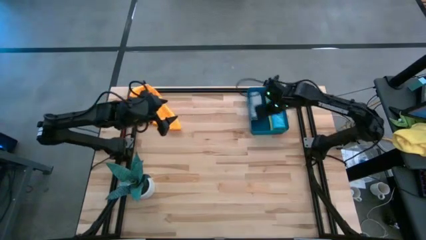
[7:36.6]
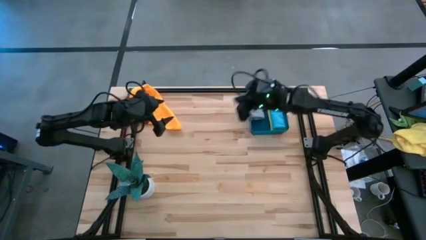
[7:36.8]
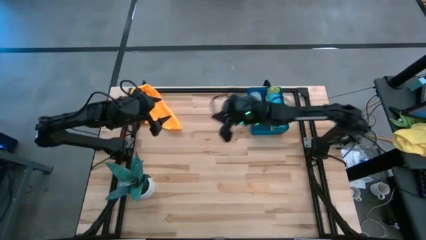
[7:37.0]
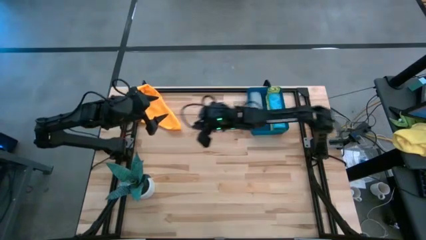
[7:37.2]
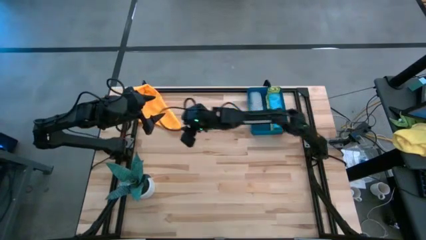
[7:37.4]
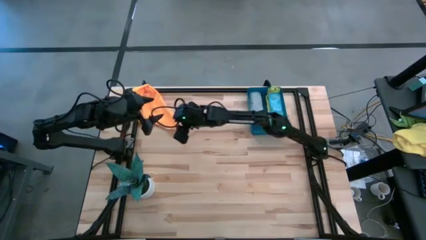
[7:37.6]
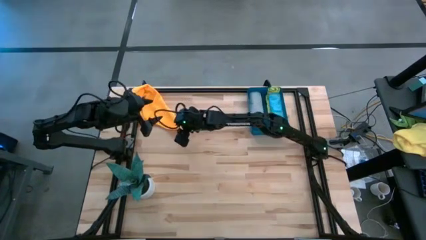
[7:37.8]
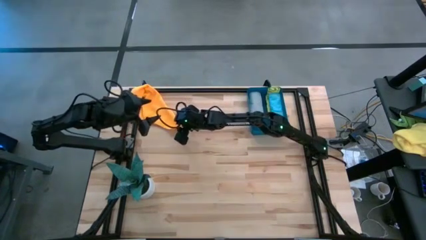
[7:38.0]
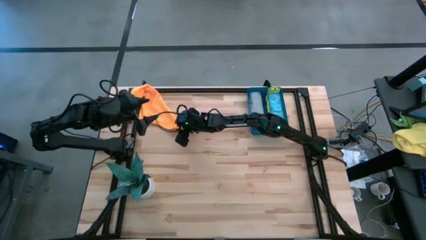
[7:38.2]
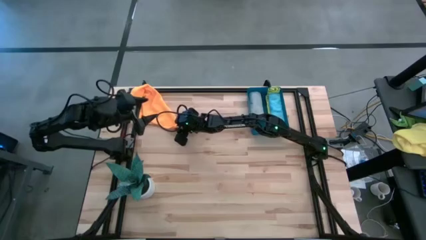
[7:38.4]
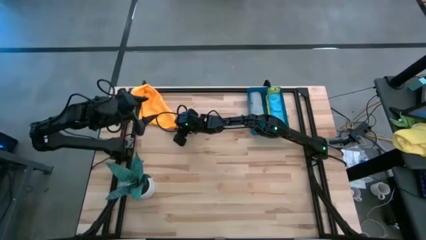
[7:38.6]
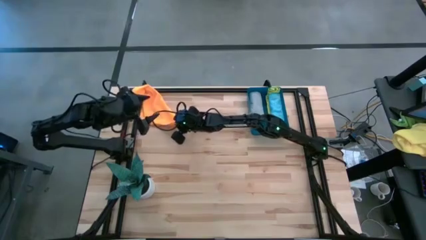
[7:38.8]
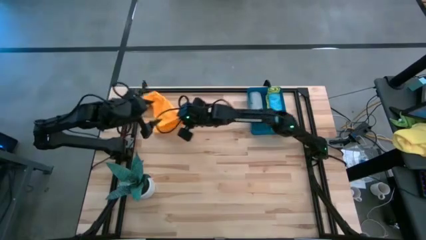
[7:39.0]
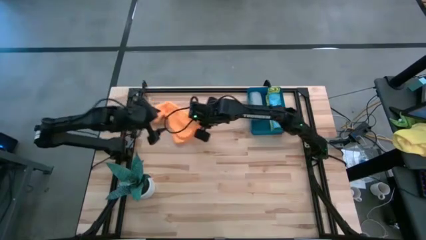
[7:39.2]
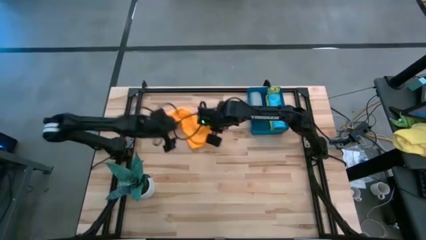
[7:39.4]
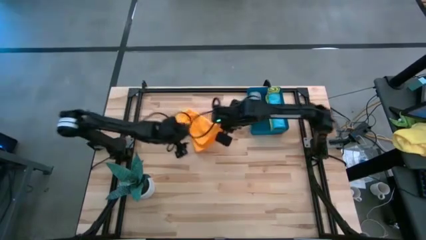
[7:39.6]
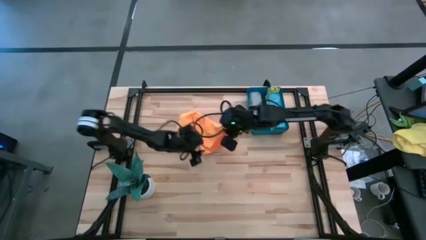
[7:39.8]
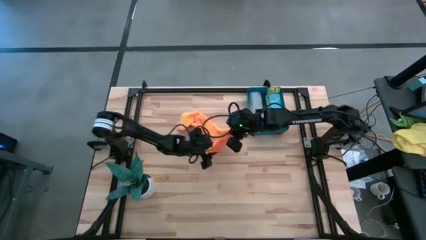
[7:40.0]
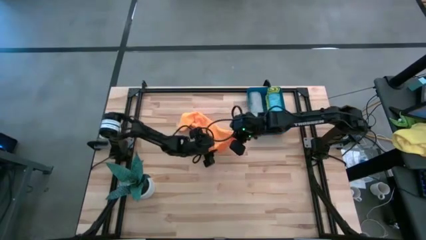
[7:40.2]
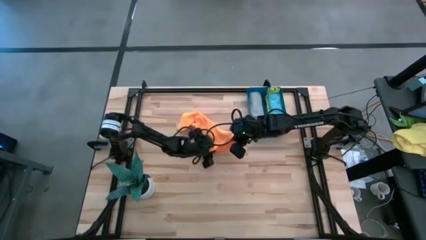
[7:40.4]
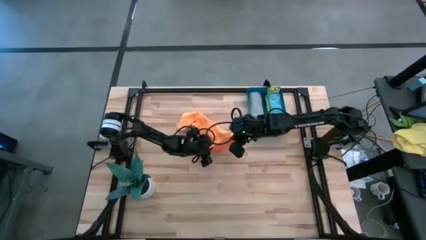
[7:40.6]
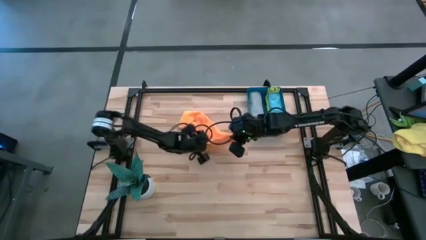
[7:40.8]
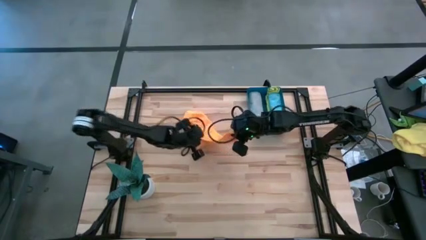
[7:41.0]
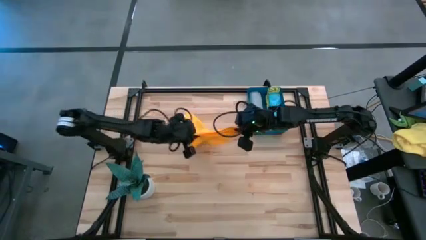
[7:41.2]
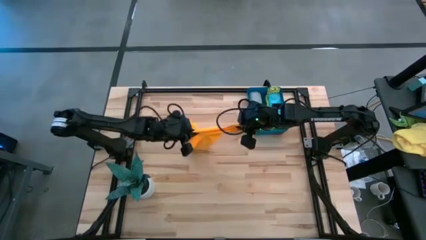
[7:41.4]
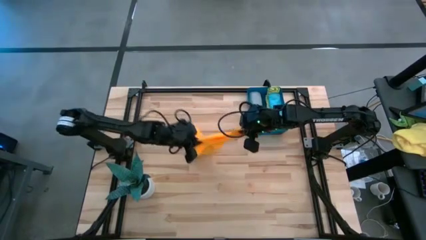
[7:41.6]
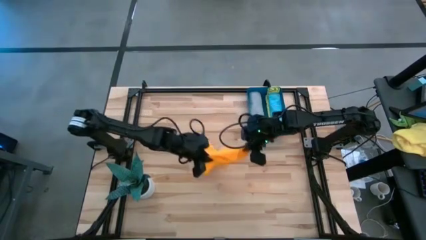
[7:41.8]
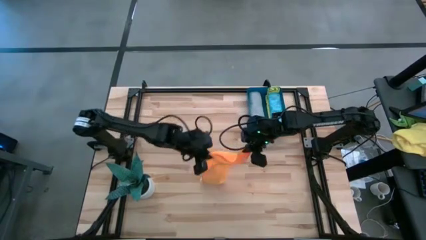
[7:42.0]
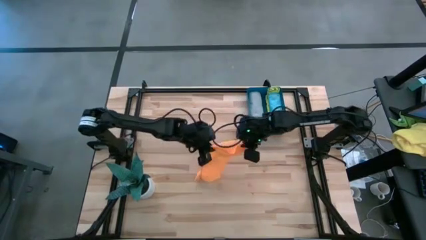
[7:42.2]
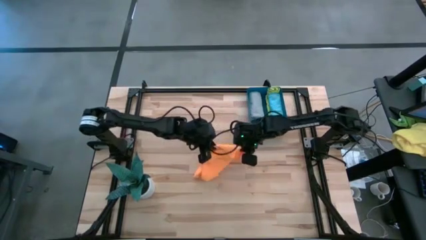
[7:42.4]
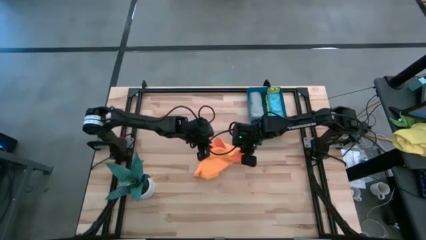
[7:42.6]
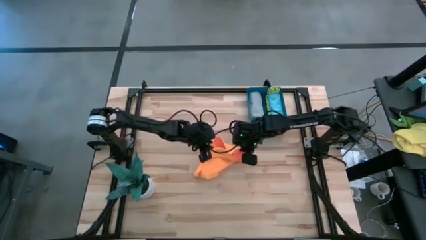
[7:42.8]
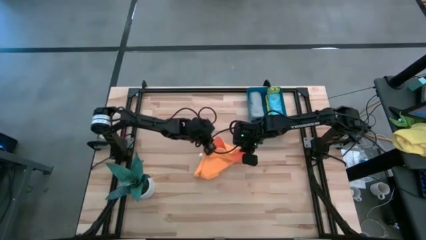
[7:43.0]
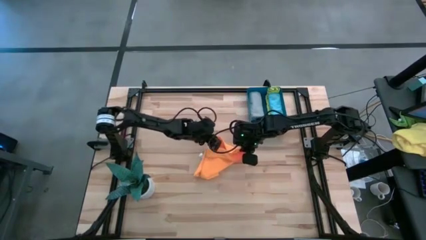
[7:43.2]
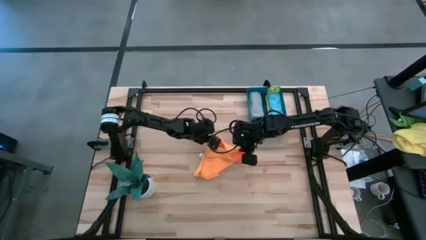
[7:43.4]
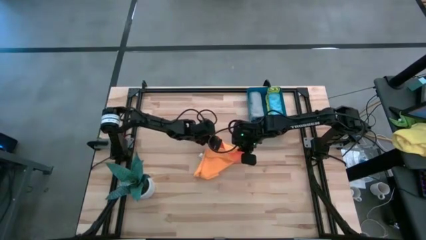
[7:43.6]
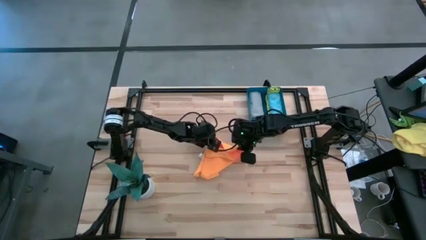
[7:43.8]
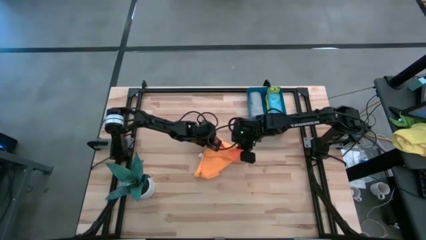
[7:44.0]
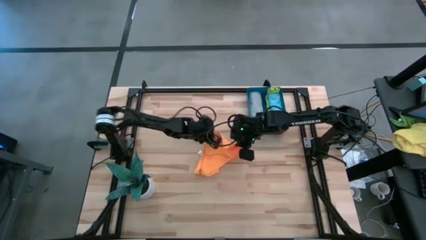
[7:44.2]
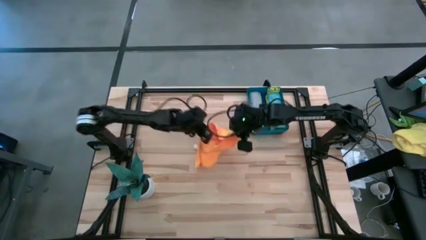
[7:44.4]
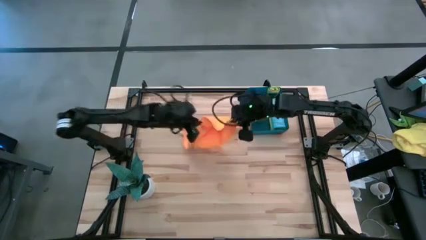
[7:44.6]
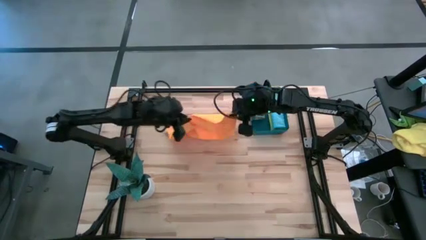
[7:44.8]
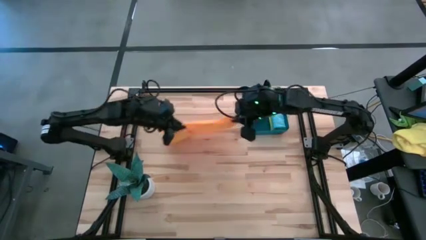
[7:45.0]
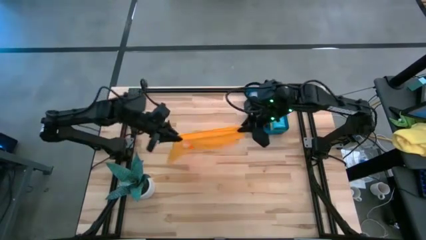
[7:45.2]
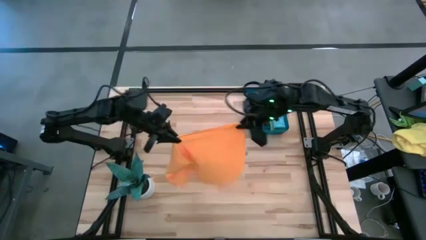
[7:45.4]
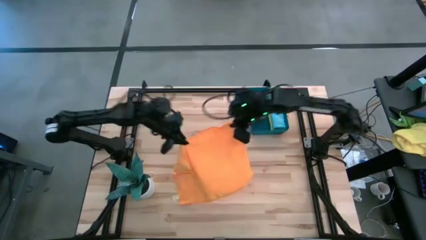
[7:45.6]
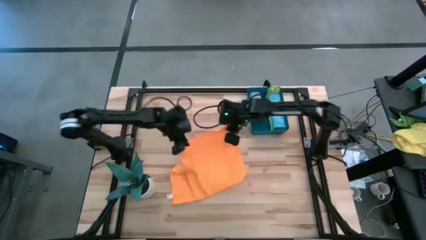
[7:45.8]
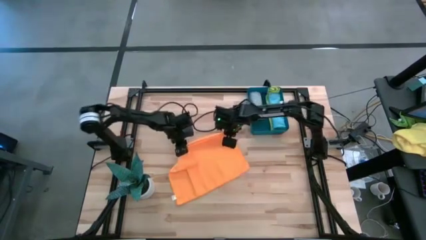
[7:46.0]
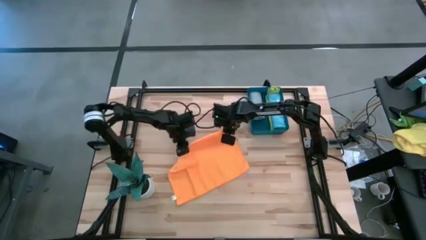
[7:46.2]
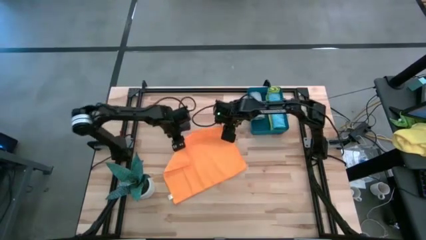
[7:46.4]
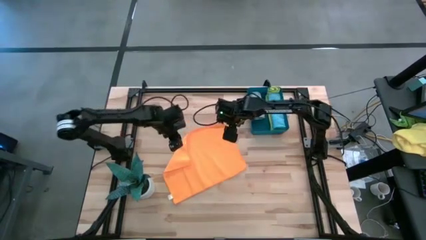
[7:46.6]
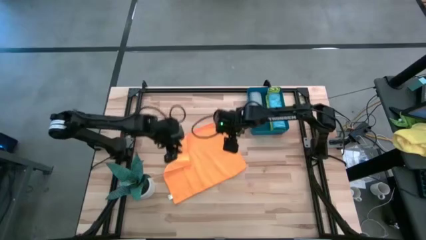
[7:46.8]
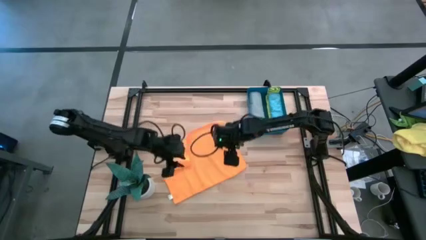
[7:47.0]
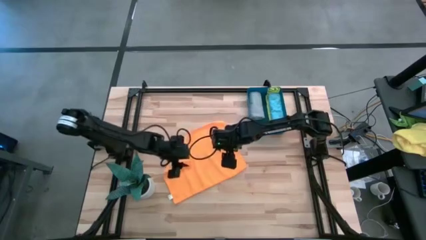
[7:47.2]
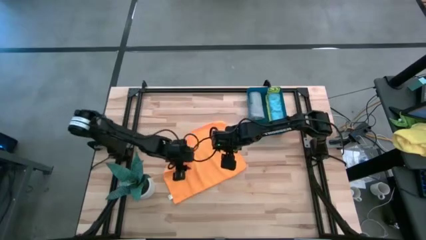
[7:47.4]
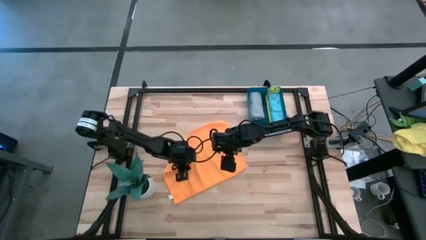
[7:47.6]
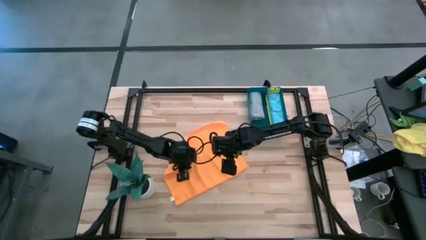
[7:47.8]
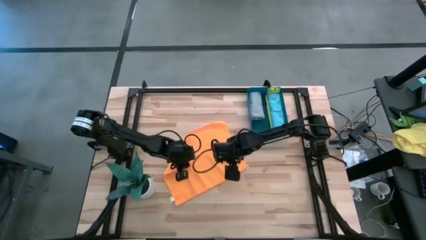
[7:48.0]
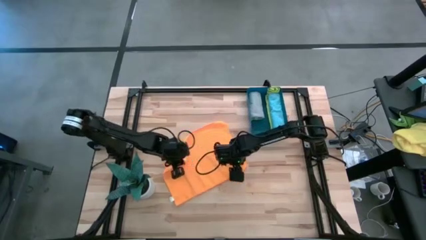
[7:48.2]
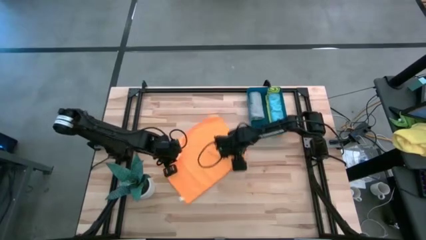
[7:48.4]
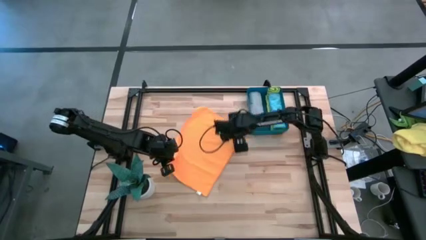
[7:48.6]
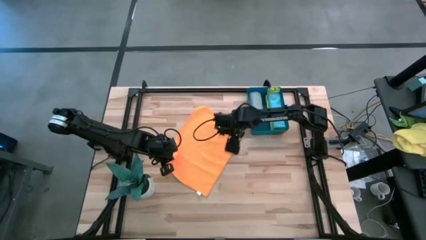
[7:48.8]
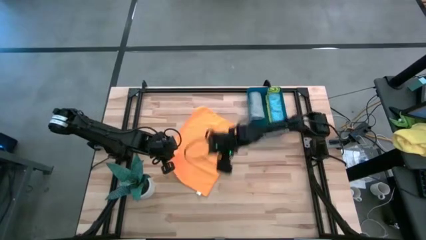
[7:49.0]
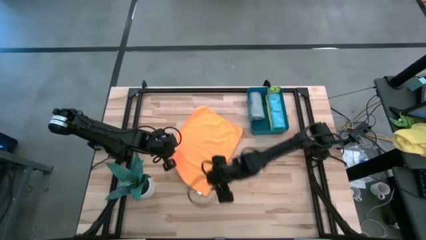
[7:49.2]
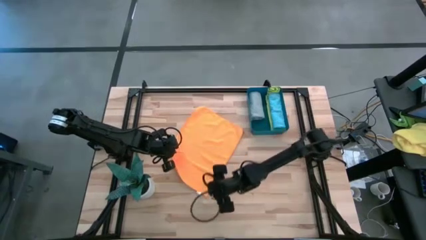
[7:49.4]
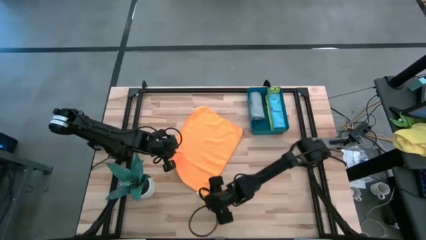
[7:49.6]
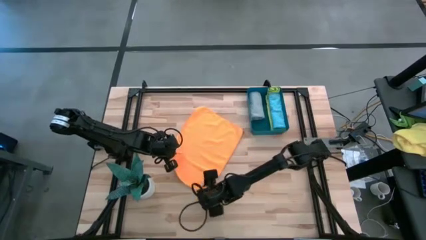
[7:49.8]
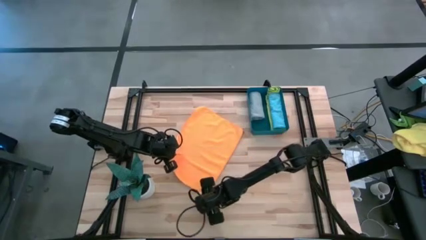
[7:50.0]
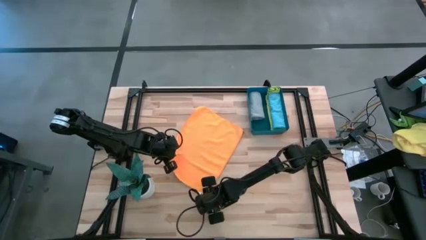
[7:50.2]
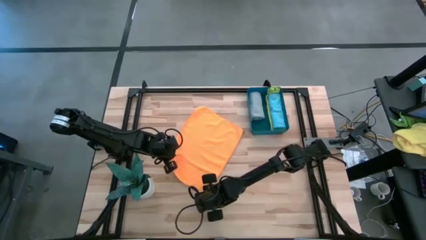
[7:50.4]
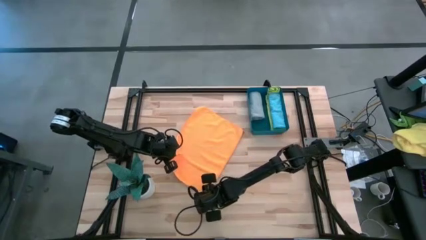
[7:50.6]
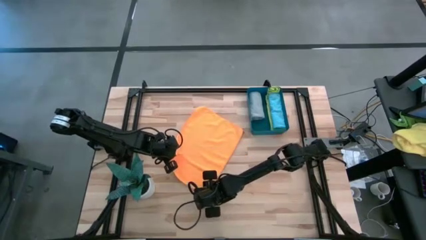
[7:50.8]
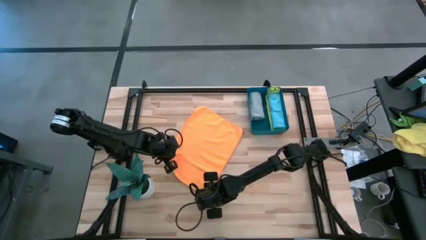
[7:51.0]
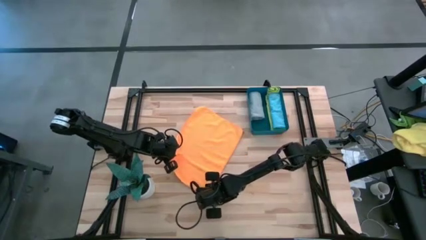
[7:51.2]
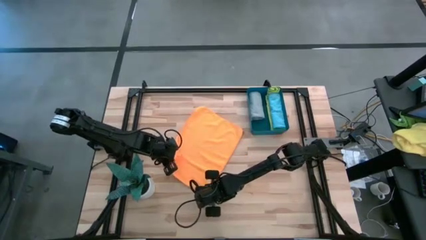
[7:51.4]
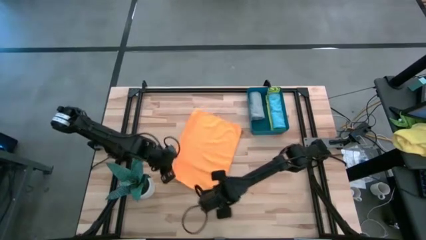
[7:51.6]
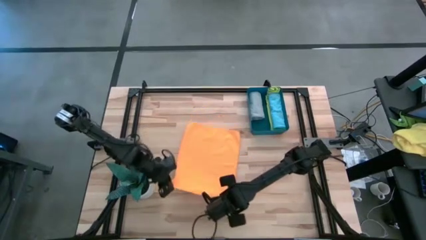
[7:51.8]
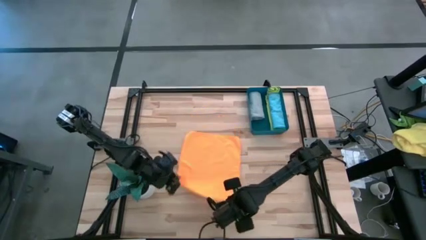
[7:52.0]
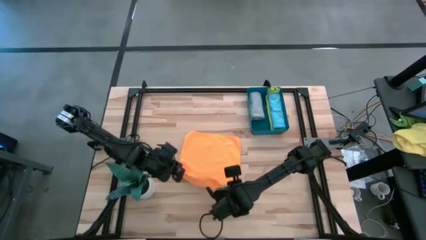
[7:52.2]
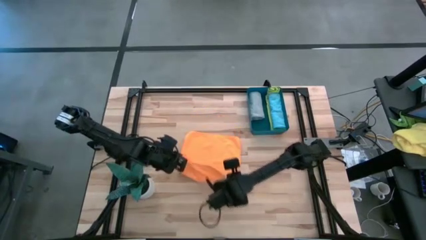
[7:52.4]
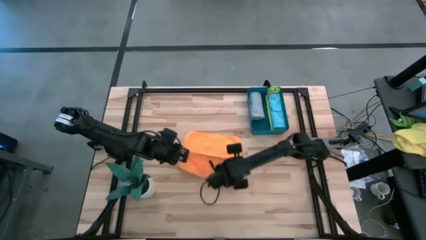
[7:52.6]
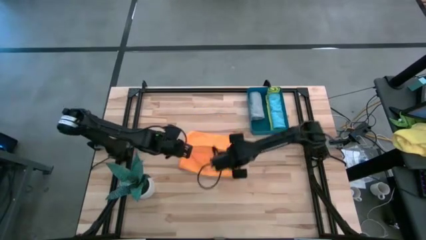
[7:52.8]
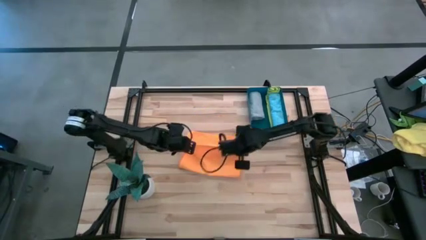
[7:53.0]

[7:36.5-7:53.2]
Task: Roll microfiber towels into tight, uniform cylinder then place into a basket
Roll the orange towel

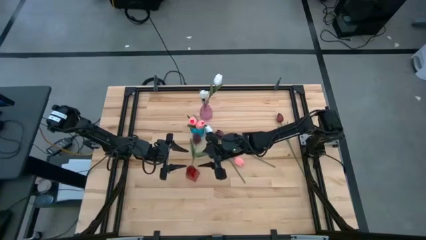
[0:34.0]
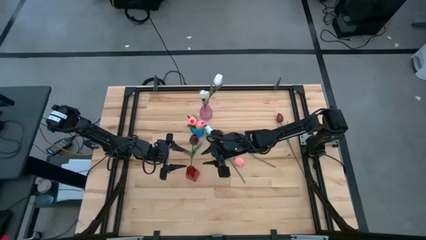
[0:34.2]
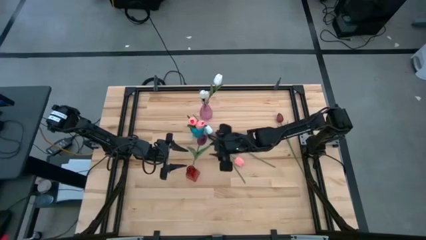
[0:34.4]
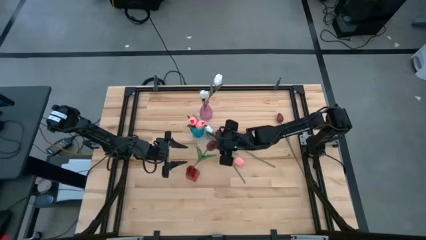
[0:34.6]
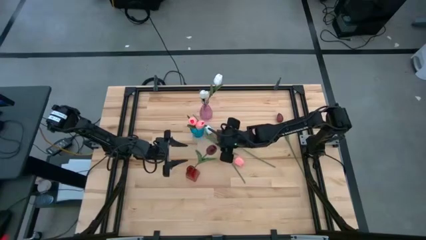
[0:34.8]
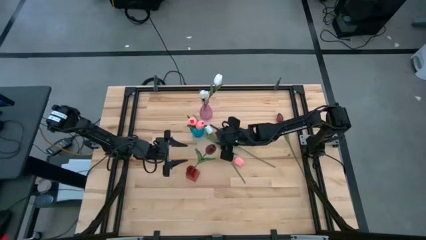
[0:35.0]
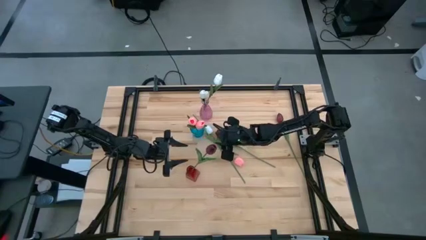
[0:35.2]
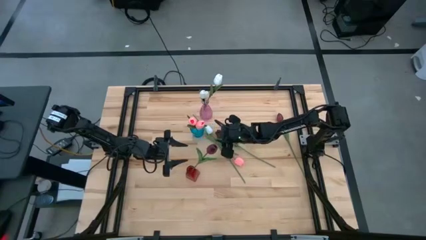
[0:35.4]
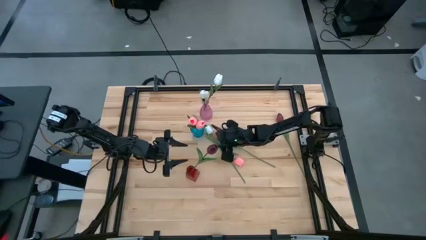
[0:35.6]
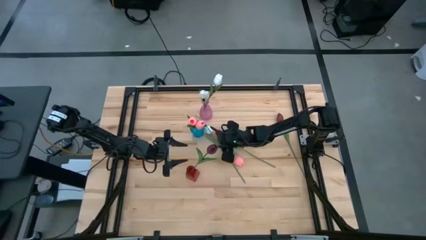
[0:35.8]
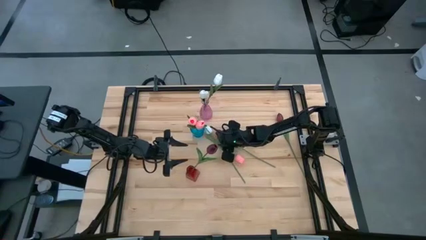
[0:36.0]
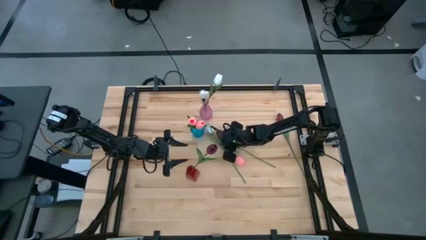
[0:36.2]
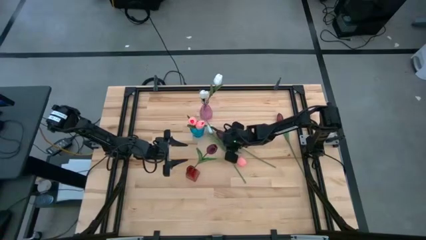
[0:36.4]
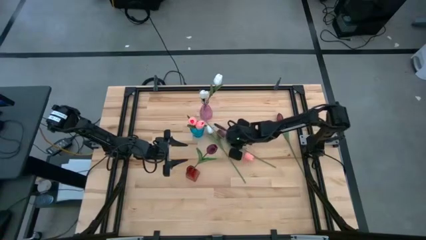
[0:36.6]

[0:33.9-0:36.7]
Task: Sort flowers into vase by color
Put the pink flower into the blue vase
